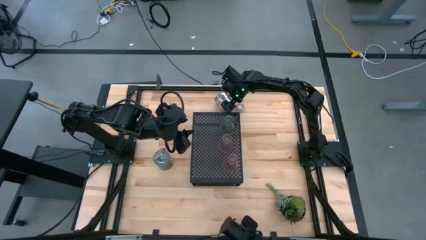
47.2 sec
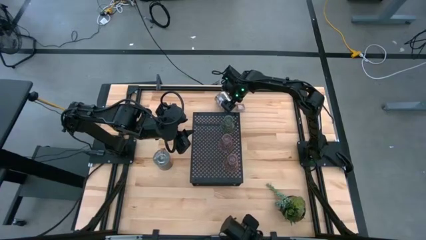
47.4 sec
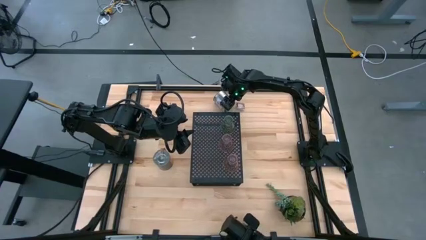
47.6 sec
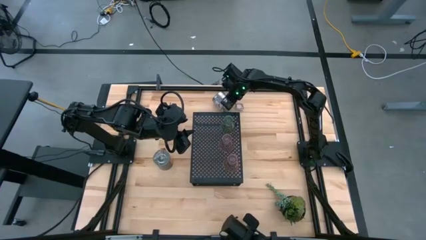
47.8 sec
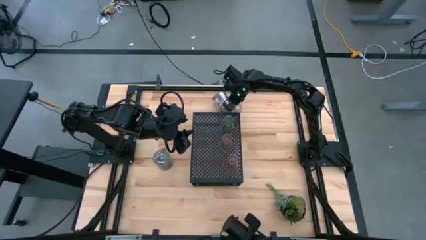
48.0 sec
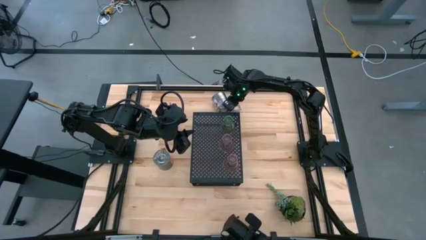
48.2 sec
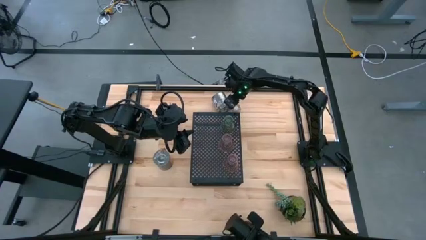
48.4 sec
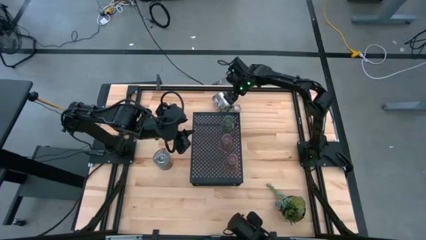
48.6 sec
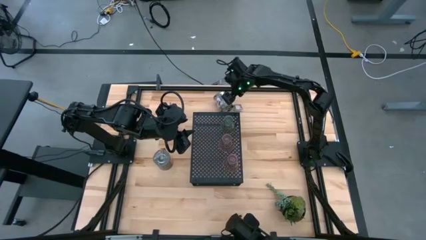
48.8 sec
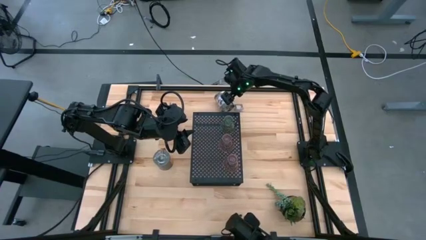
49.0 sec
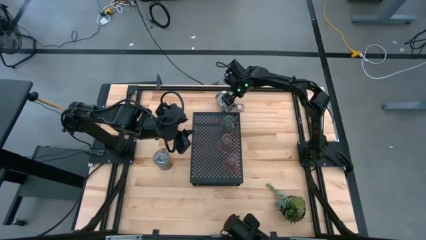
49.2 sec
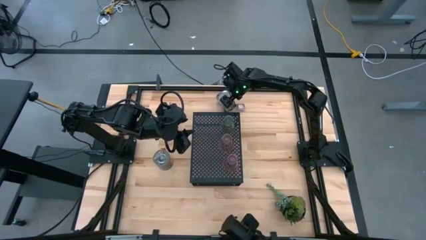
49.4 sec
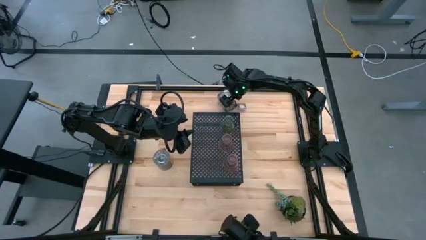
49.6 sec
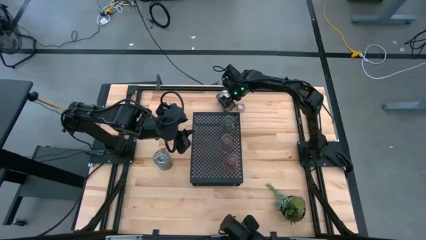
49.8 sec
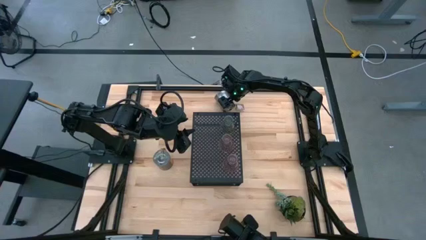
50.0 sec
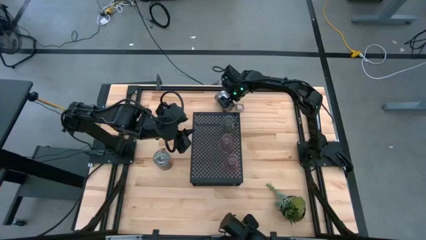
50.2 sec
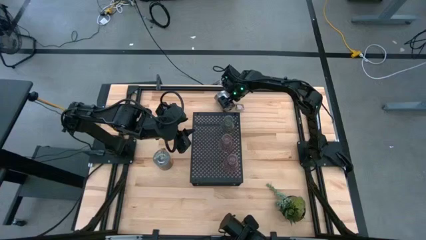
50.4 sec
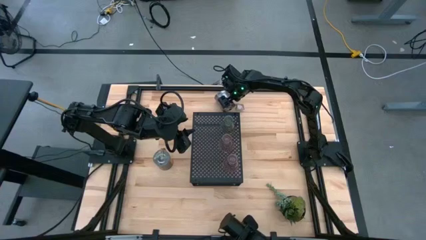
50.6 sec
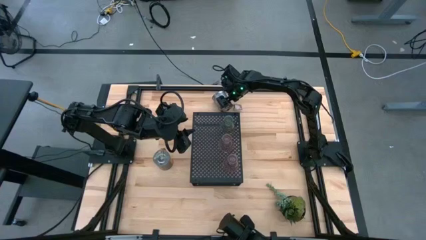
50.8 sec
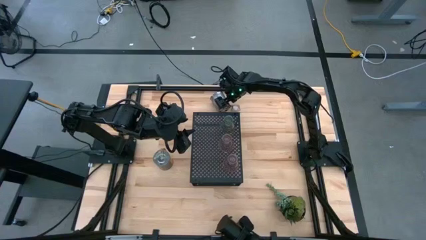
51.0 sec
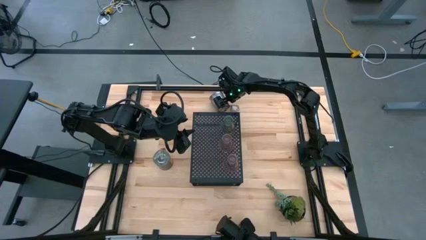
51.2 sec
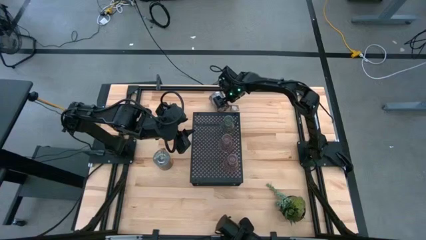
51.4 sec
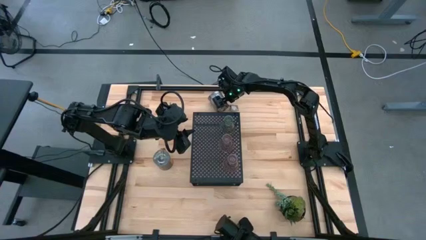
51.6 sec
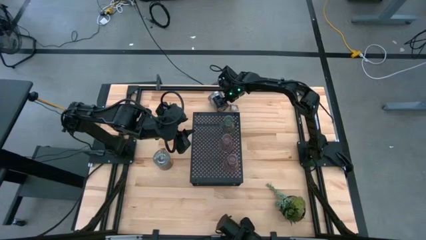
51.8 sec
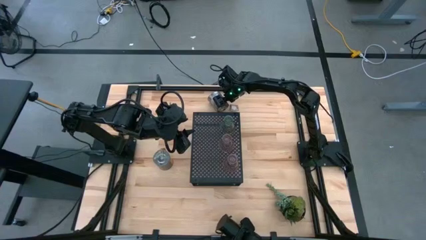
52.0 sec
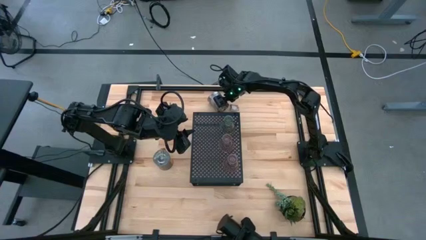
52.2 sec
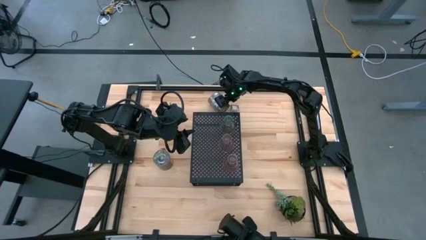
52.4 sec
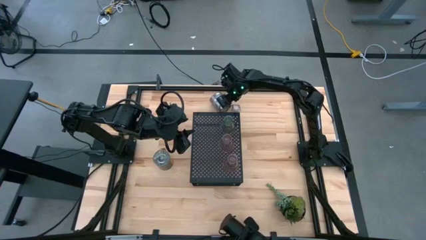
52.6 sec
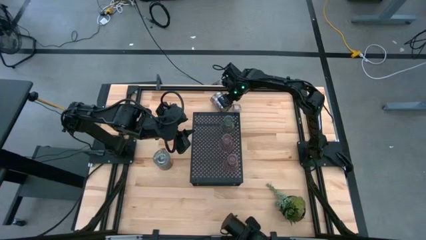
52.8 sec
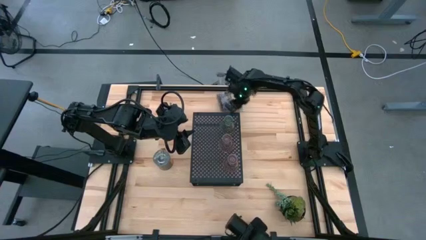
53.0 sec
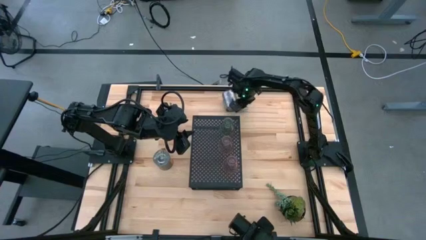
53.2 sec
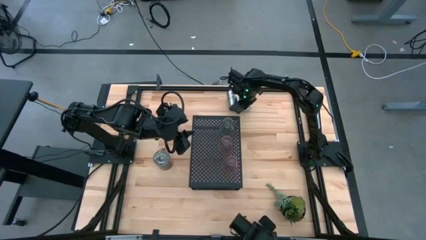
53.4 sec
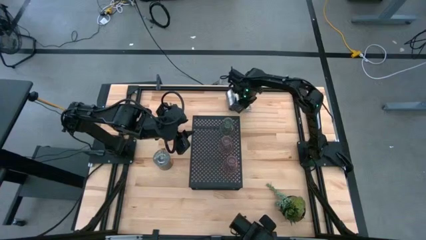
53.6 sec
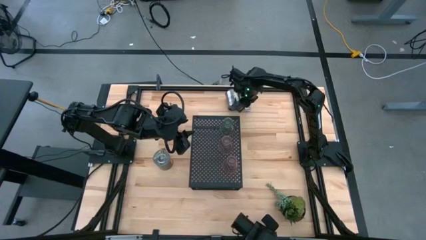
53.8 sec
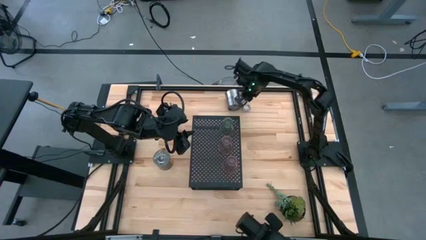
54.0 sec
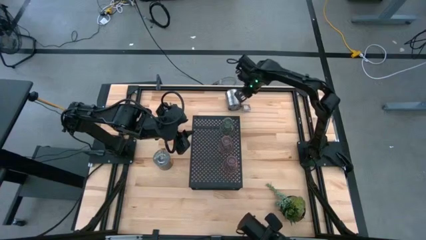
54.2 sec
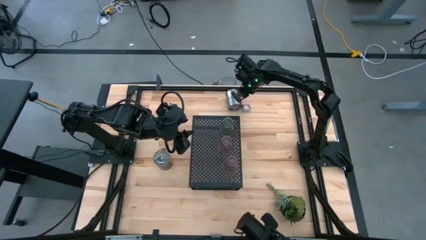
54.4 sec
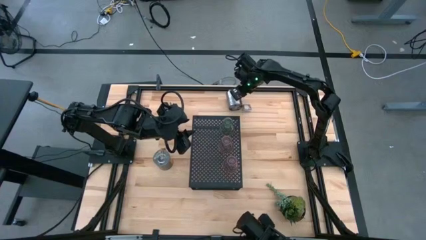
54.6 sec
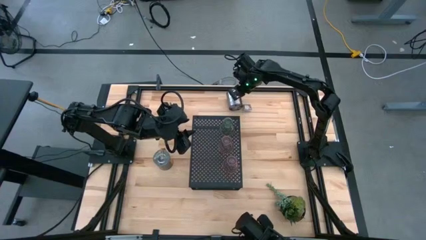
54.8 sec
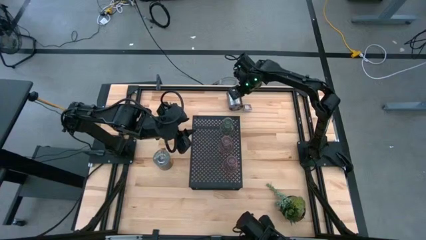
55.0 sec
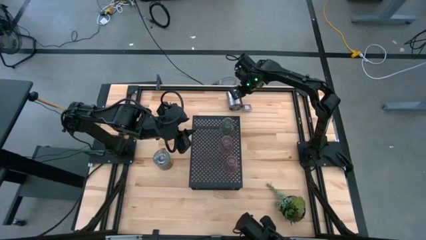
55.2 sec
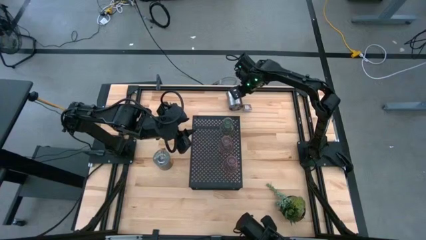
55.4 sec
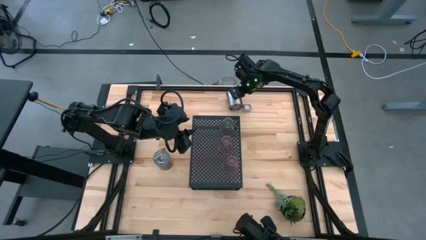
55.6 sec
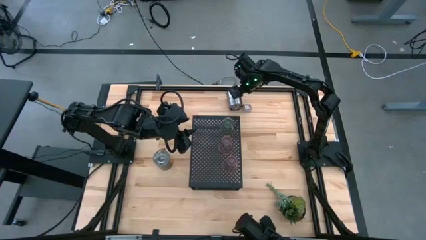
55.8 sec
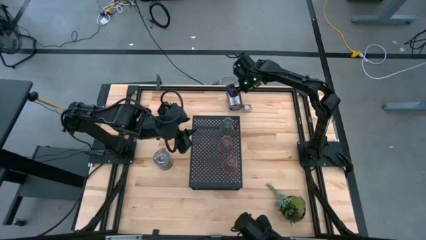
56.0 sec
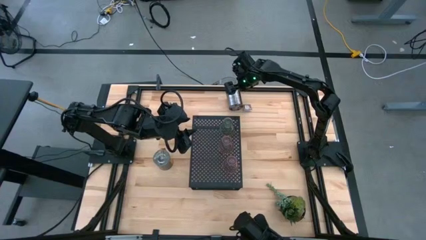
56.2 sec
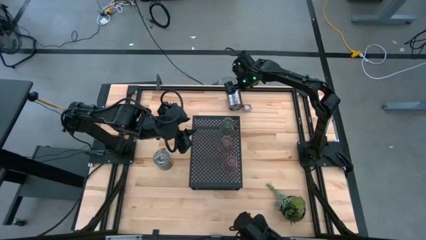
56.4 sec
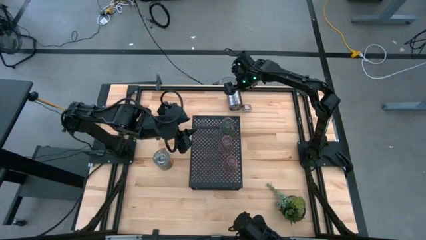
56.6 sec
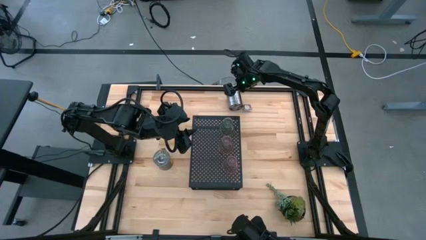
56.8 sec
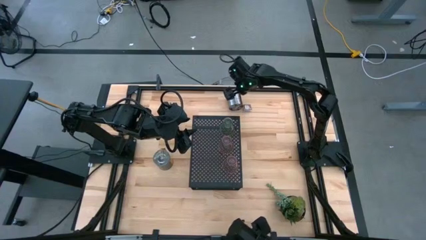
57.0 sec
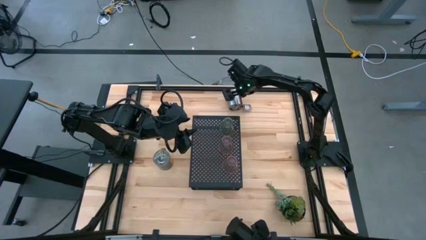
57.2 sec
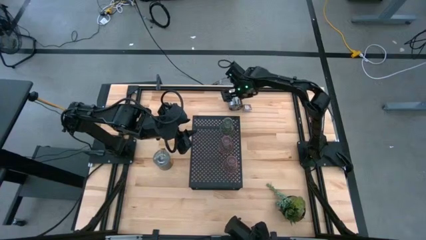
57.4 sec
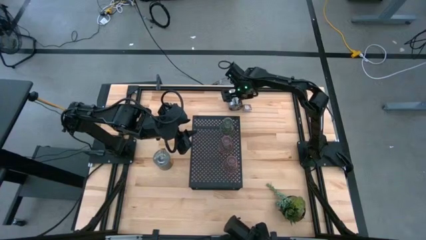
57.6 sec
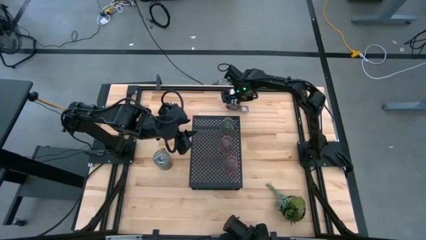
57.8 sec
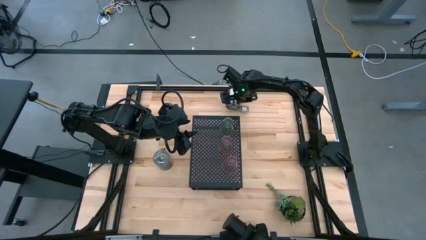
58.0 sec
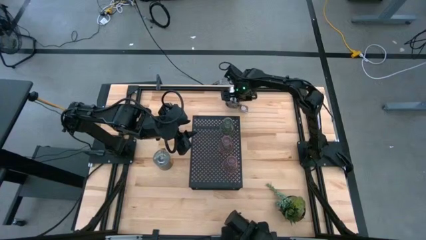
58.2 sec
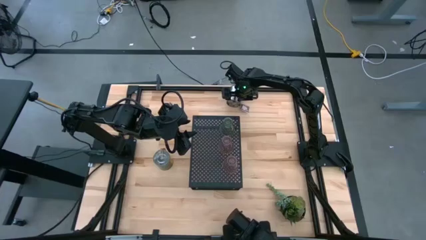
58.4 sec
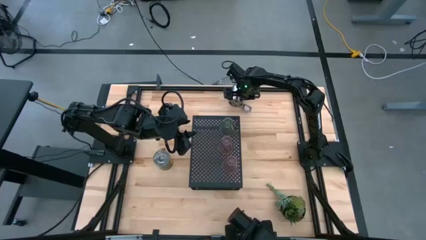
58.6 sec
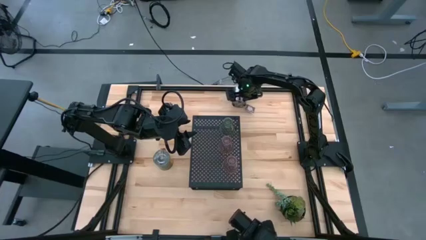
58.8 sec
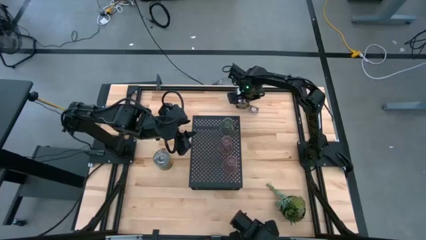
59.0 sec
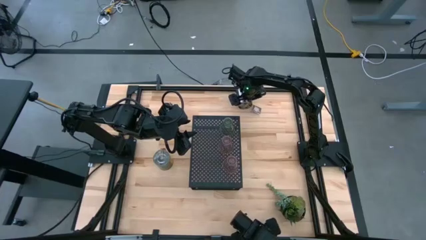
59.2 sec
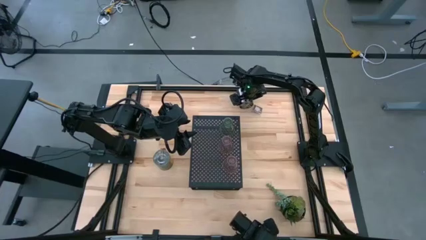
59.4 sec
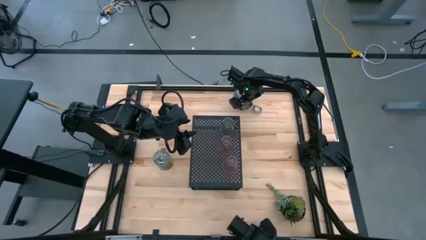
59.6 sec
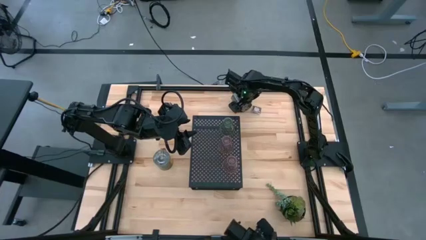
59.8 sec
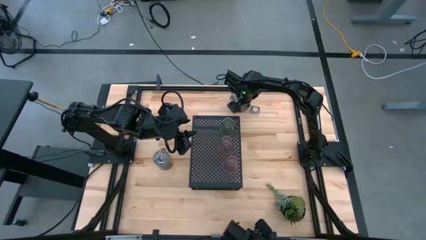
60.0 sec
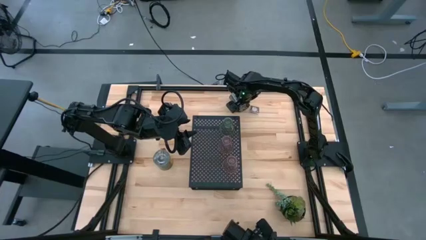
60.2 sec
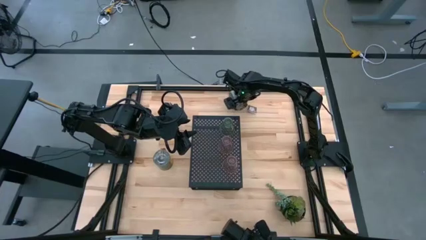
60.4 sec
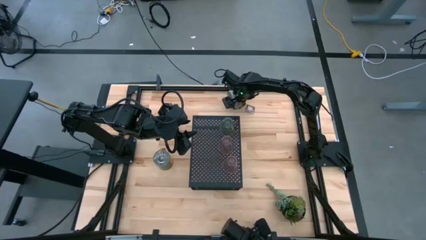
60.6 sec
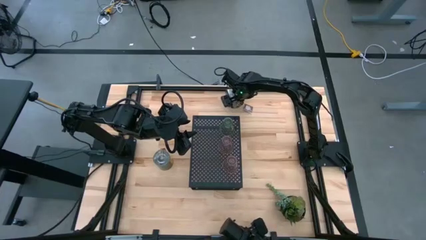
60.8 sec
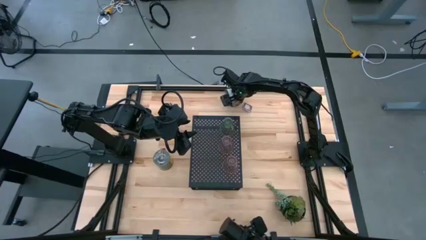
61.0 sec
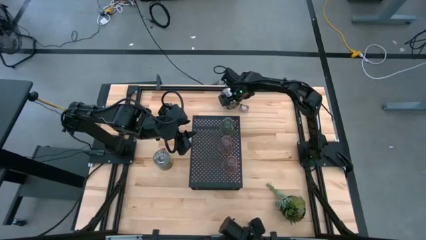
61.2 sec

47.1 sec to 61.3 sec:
Task: Pick & Place candle stick holders
Put the top silver scented candle on the shelf

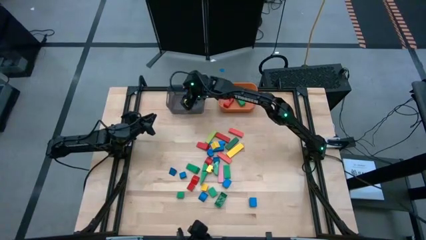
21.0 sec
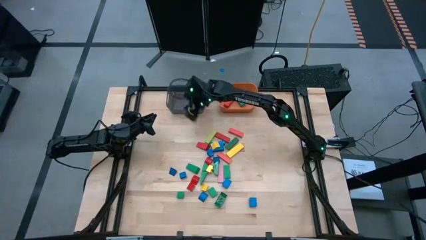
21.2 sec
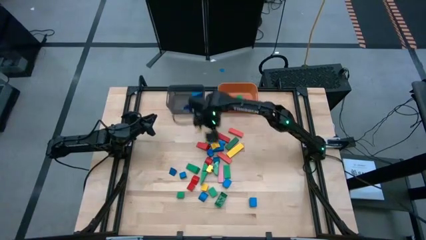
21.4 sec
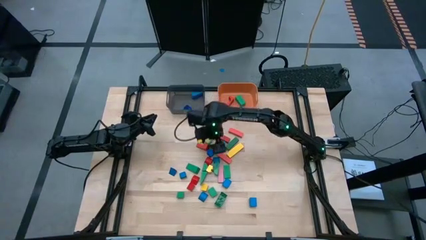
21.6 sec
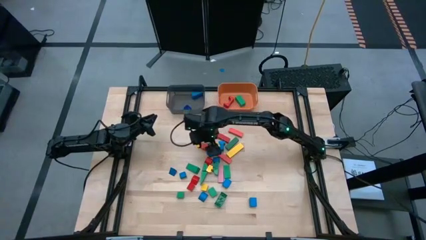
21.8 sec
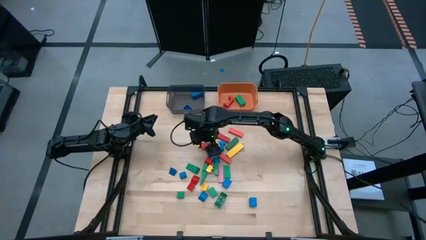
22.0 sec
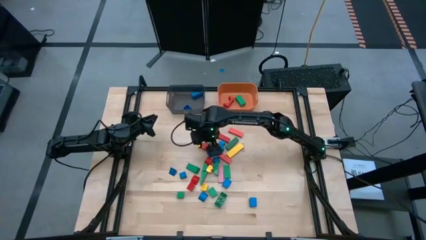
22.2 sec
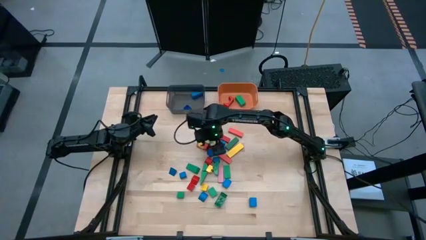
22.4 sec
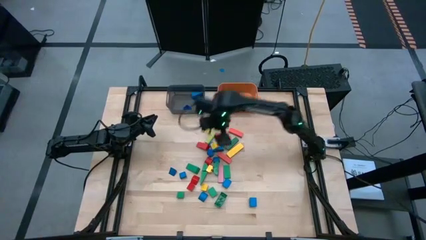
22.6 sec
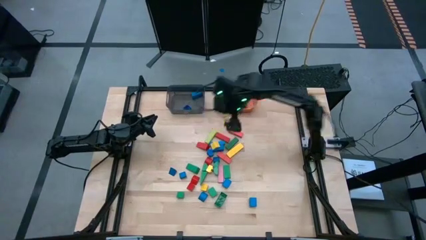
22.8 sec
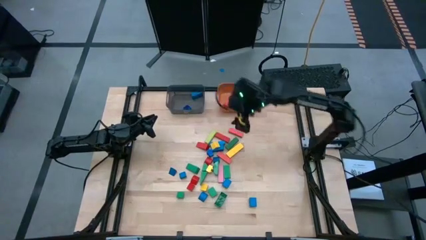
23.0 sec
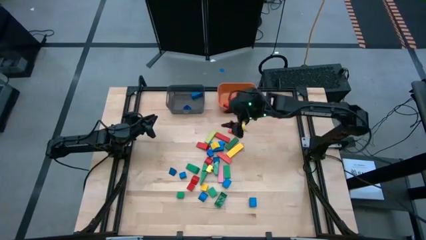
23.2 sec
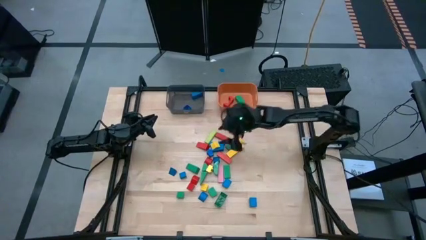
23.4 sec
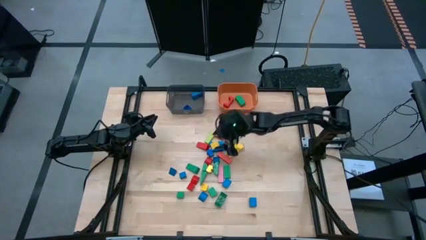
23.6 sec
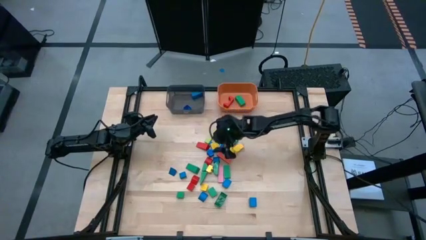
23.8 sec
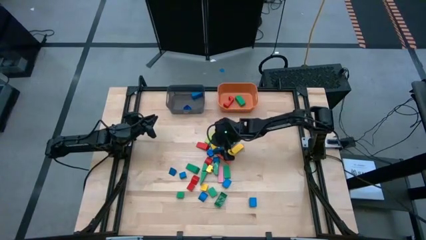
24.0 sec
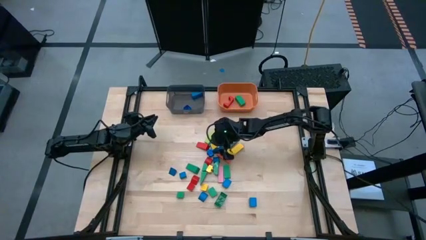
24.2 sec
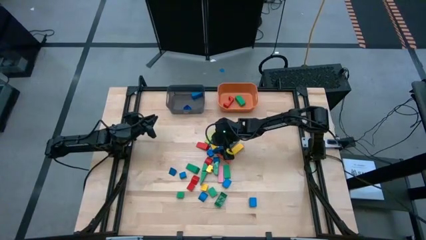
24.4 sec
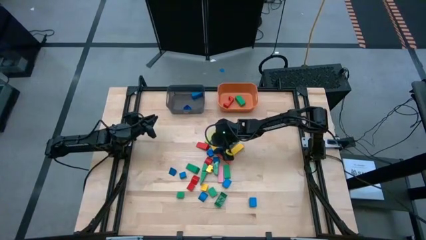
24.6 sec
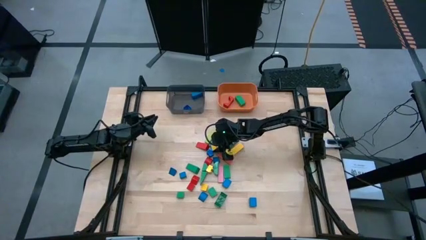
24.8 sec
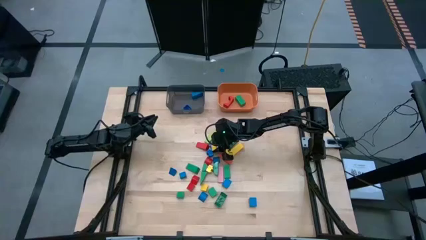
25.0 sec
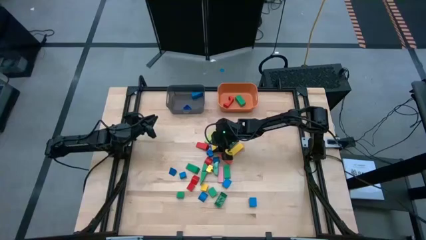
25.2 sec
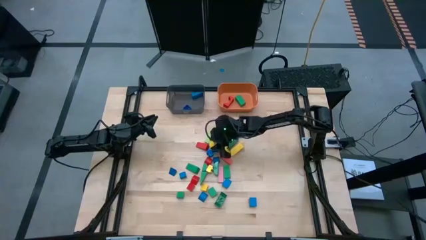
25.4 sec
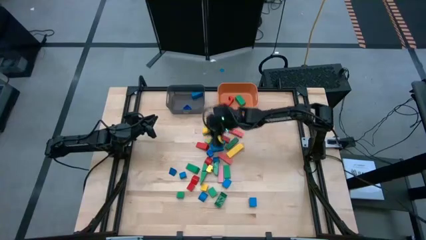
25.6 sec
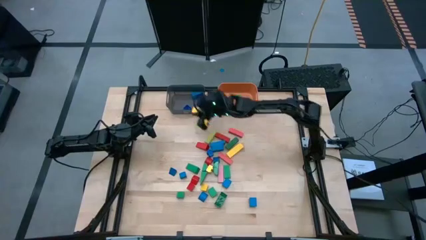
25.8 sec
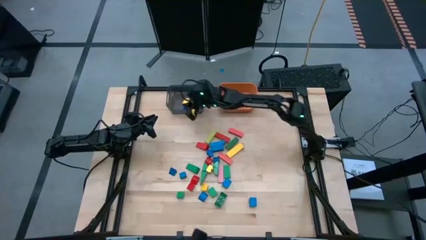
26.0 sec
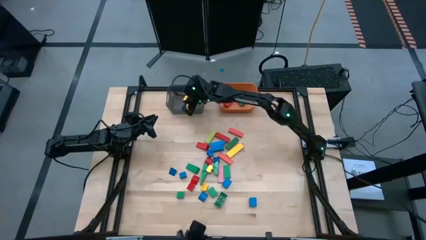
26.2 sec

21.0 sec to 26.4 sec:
Task: Sort blocks by size
Put the small yellow block into the black bin
